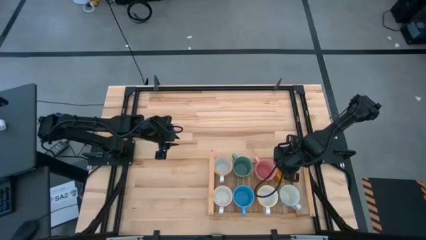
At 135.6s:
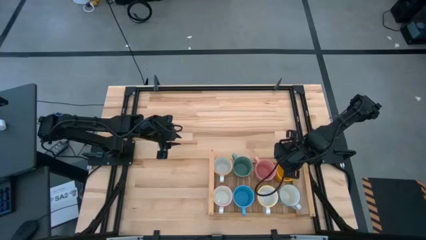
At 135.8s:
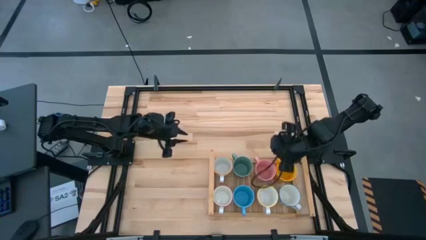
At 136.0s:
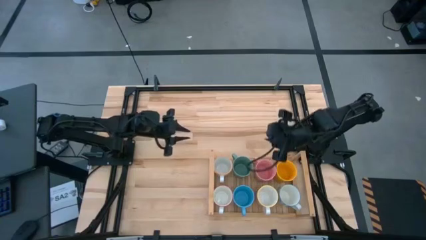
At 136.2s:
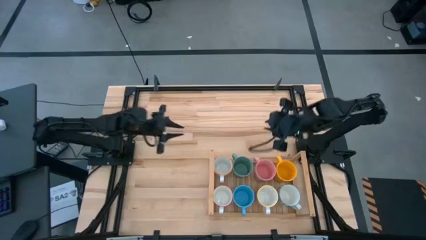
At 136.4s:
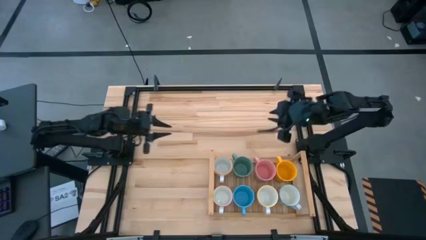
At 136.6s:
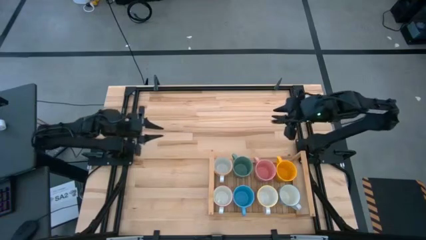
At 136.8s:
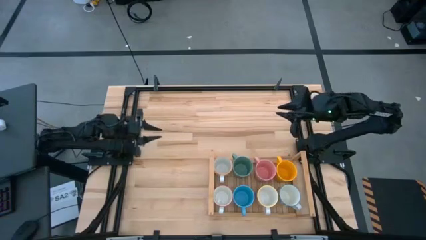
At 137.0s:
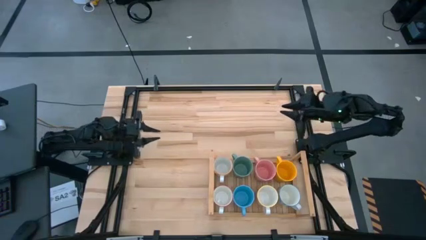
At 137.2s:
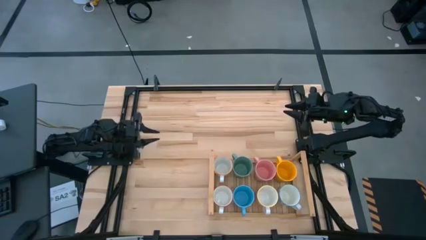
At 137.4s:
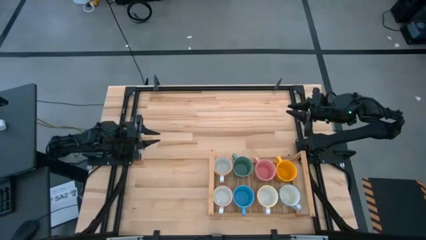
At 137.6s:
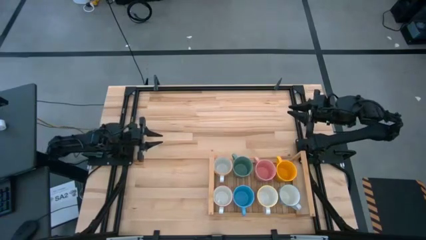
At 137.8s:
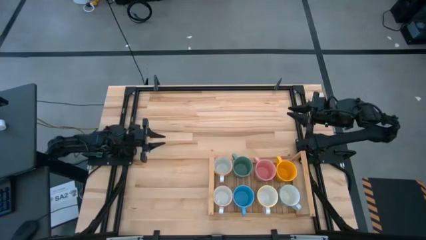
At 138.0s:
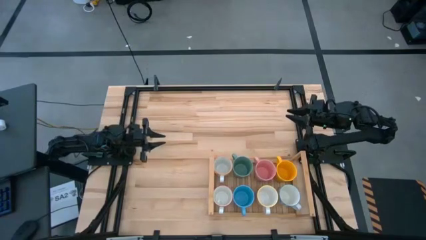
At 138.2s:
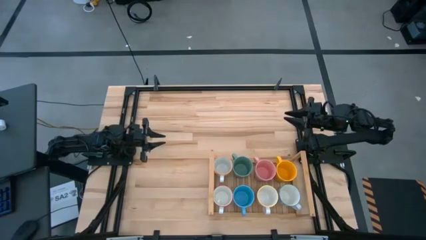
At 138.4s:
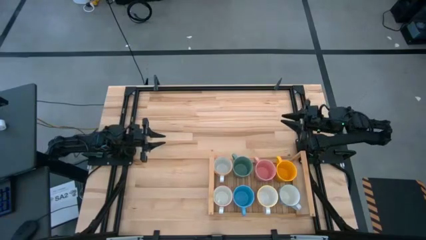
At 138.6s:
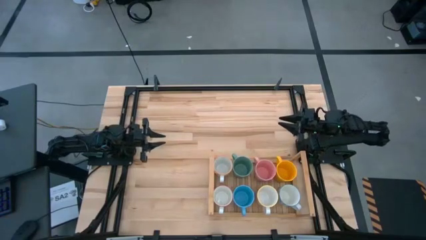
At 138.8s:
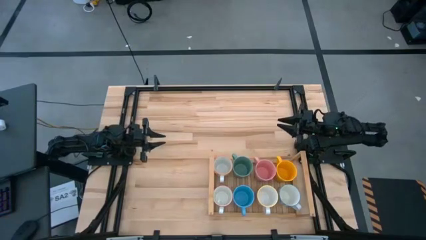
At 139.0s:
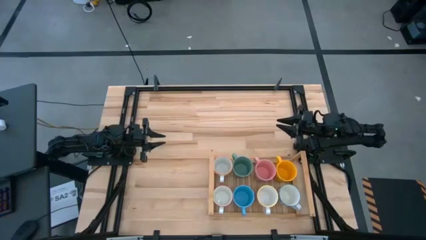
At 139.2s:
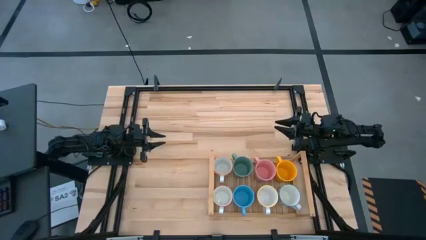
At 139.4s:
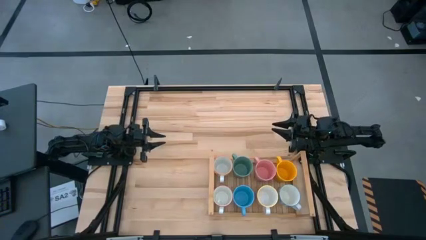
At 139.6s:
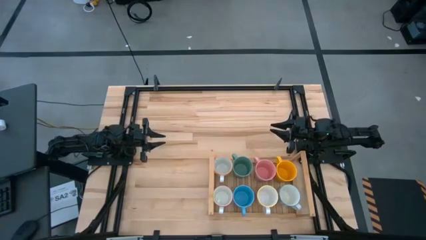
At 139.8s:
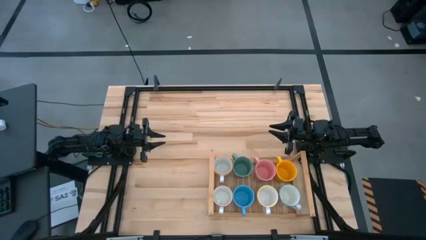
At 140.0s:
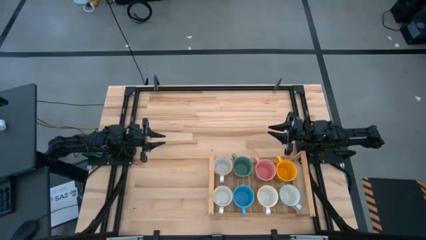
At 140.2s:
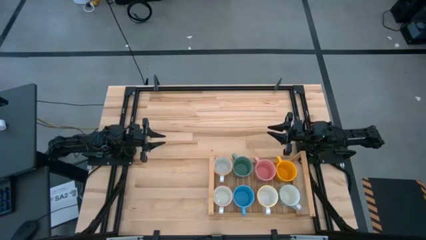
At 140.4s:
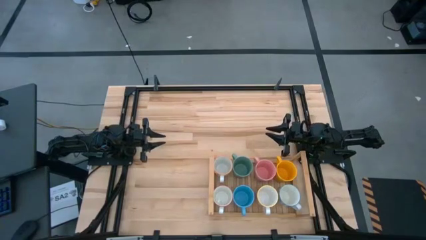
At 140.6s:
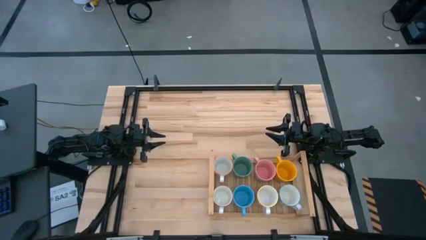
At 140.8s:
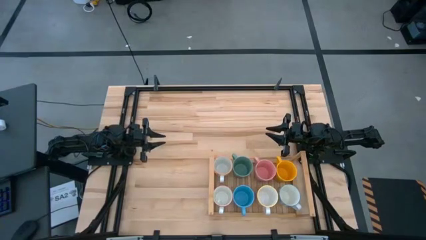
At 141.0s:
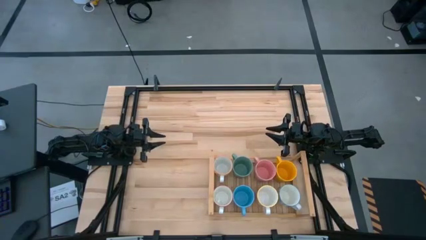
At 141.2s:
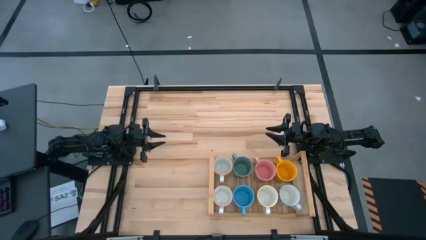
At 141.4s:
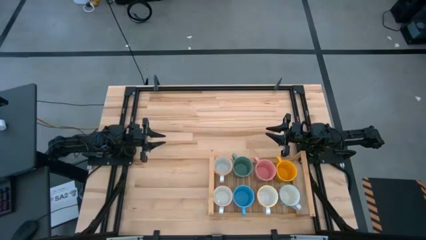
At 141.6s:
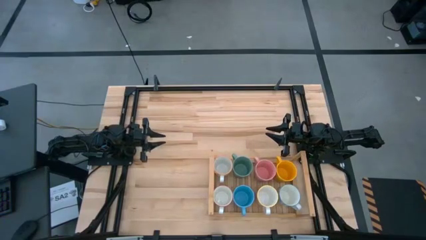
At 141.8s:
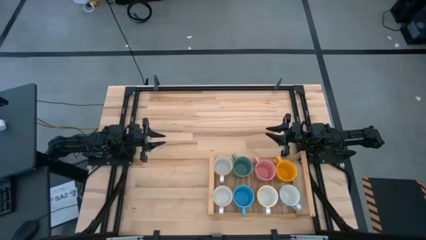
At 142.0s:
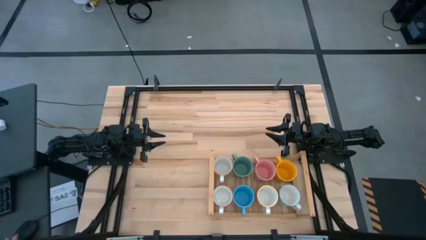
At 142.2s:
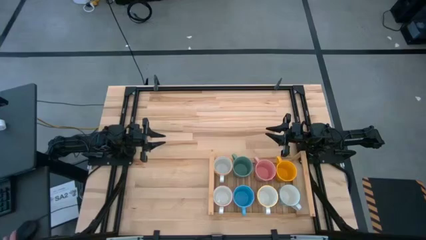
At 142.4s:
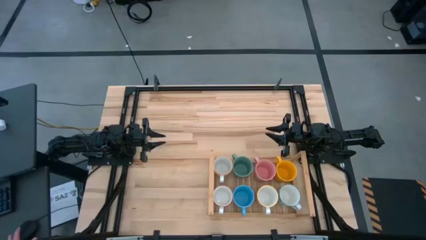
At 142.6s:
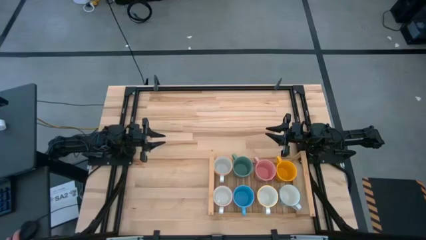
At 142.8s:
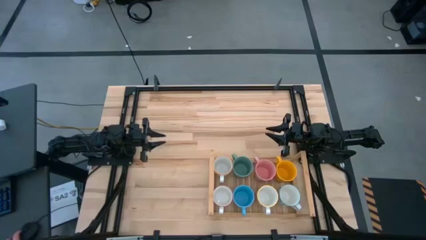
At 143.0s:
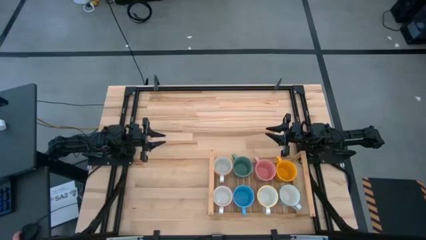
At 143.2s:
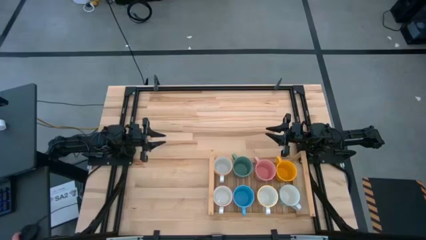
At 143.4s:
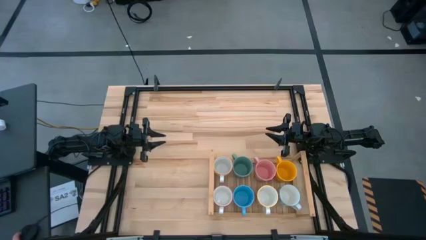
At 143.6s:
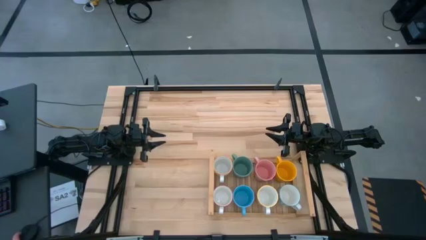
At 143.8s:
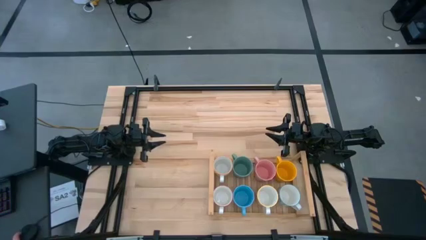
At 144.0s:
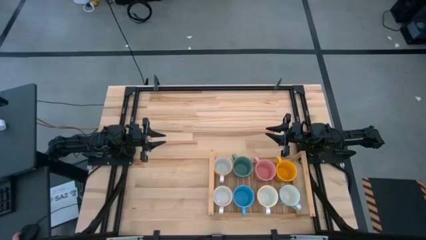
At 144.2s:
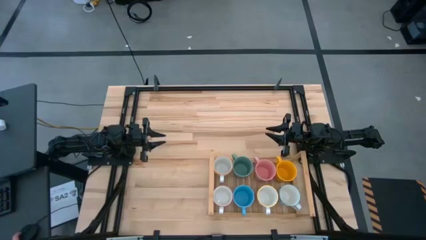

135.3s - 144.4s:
Task: Place coffee mugs
Return to Home Position

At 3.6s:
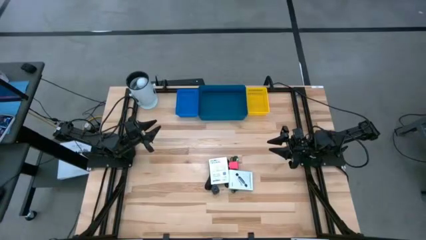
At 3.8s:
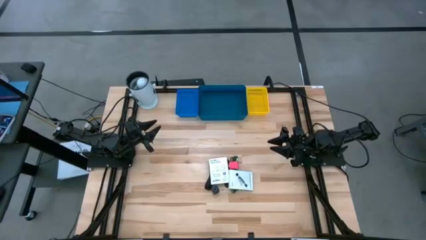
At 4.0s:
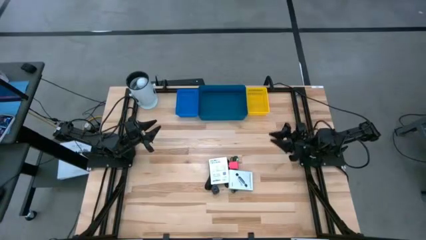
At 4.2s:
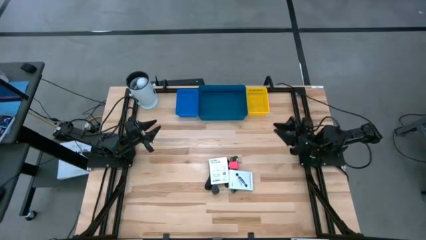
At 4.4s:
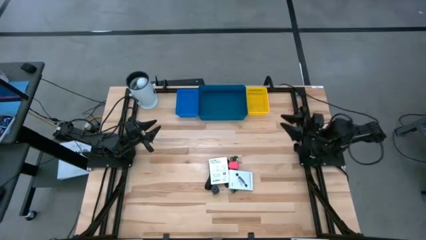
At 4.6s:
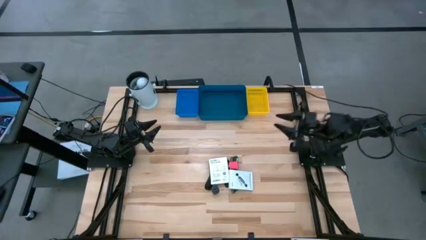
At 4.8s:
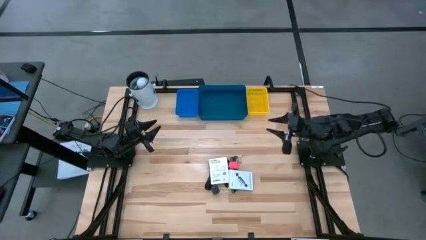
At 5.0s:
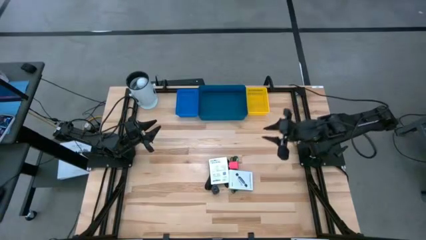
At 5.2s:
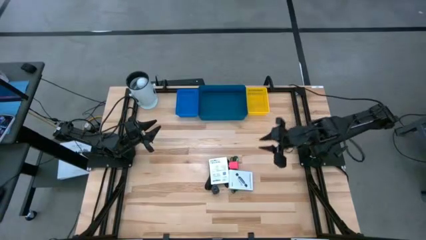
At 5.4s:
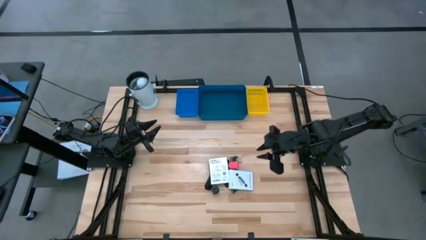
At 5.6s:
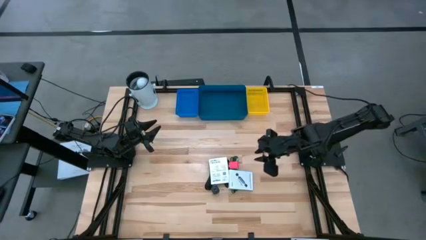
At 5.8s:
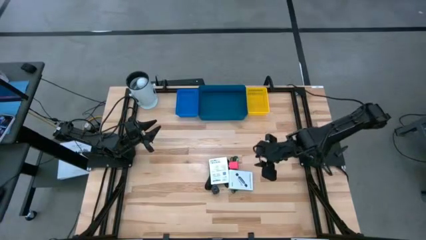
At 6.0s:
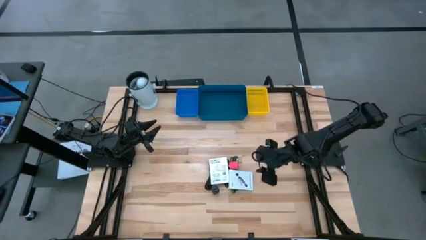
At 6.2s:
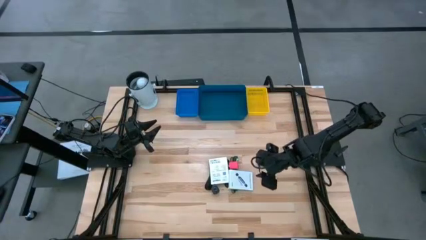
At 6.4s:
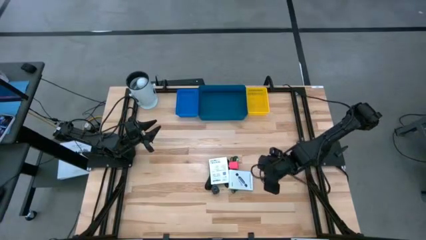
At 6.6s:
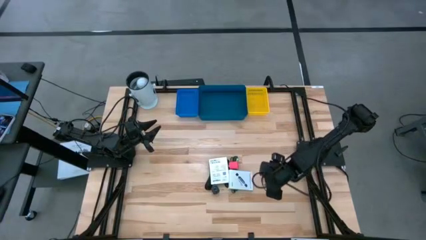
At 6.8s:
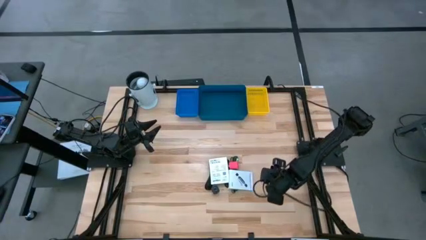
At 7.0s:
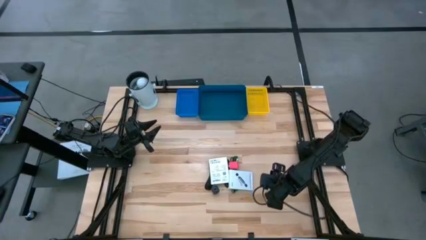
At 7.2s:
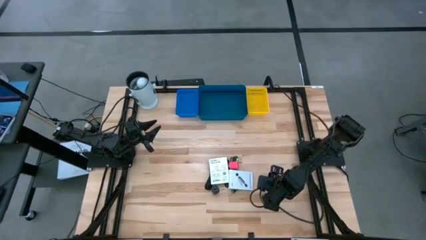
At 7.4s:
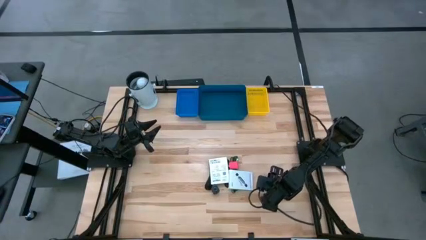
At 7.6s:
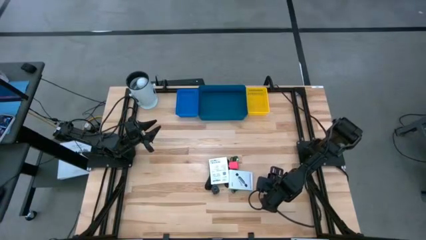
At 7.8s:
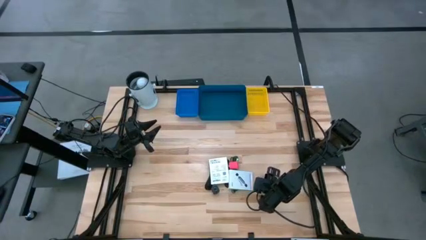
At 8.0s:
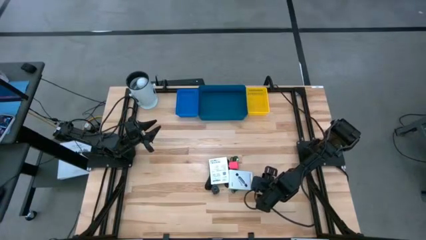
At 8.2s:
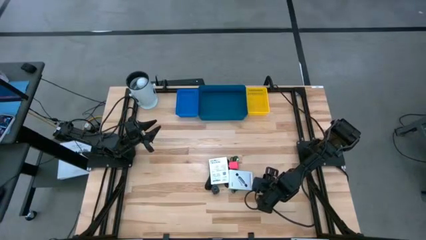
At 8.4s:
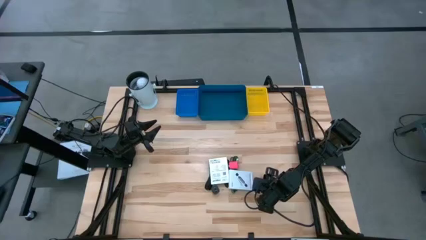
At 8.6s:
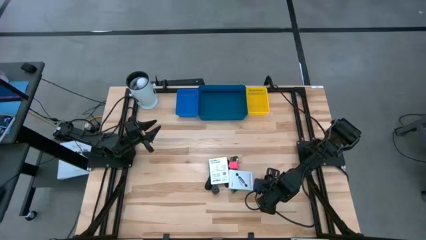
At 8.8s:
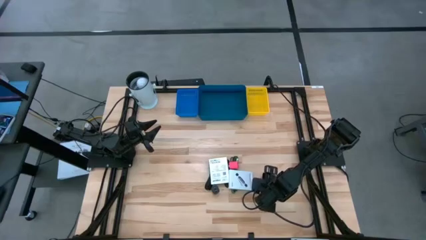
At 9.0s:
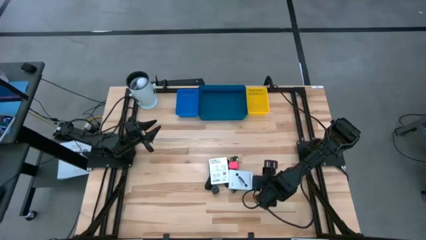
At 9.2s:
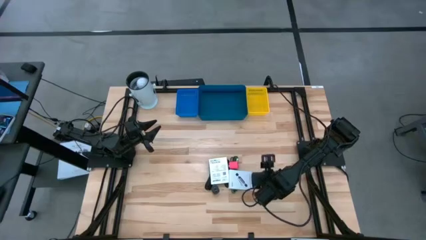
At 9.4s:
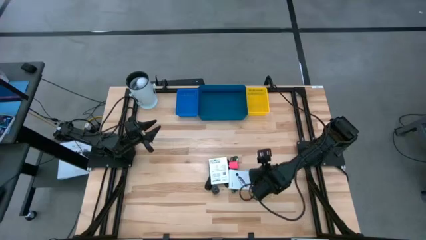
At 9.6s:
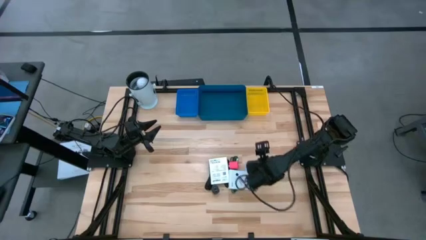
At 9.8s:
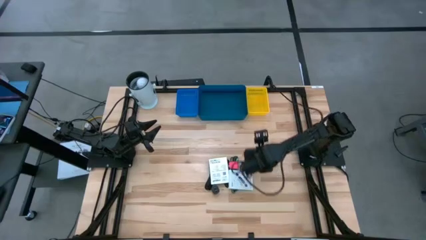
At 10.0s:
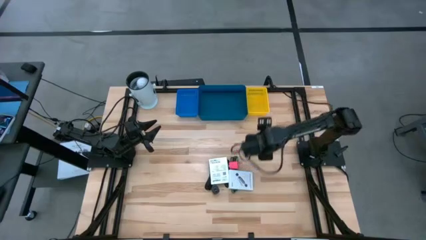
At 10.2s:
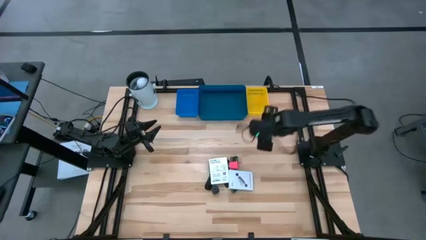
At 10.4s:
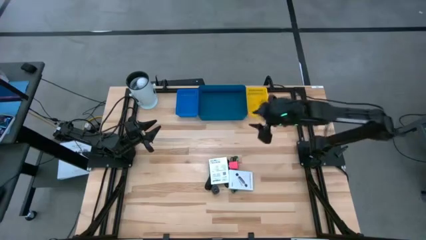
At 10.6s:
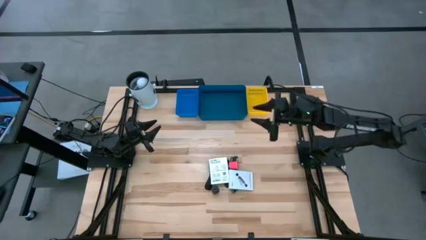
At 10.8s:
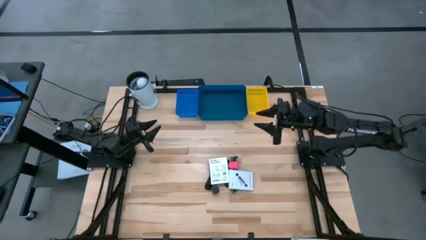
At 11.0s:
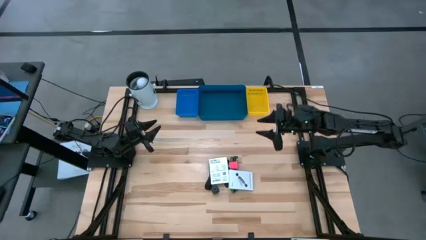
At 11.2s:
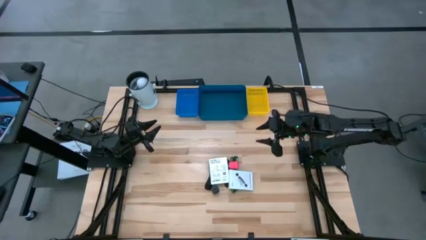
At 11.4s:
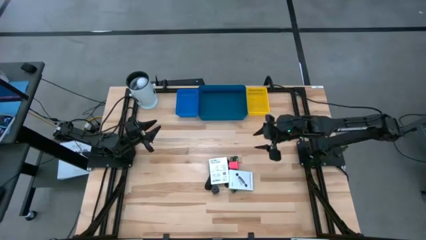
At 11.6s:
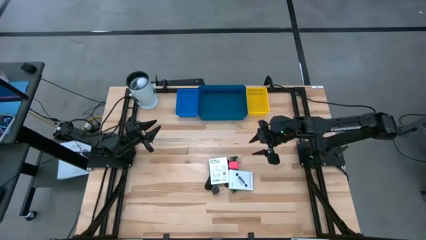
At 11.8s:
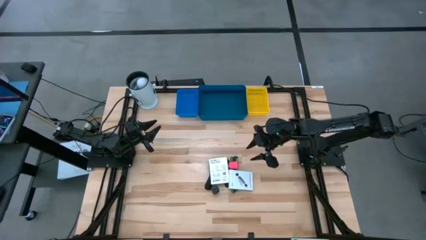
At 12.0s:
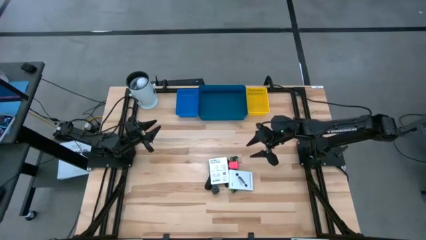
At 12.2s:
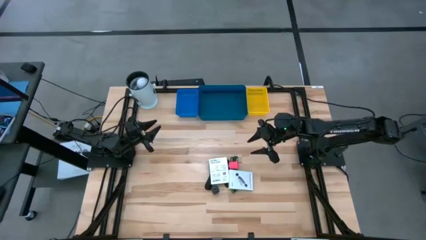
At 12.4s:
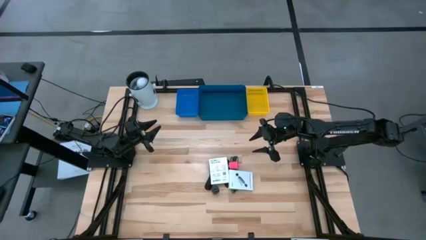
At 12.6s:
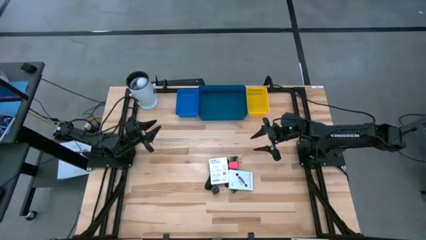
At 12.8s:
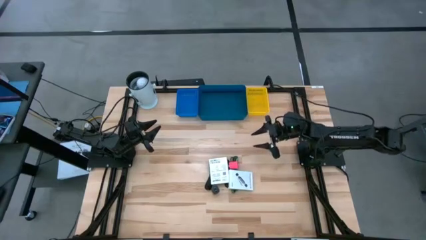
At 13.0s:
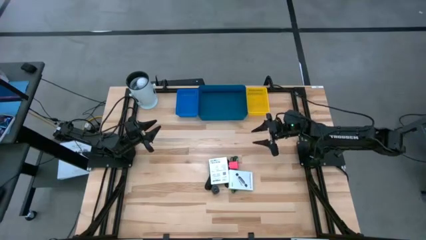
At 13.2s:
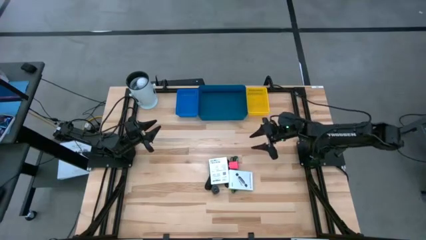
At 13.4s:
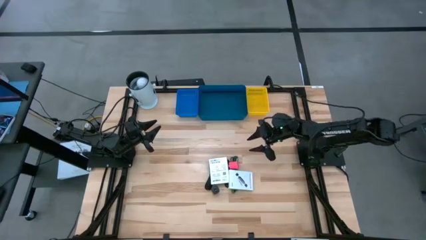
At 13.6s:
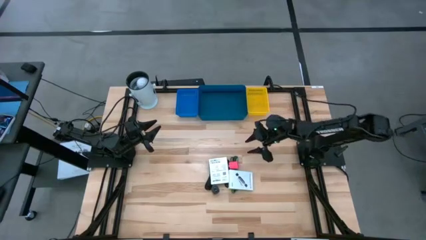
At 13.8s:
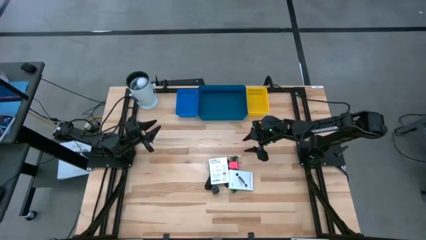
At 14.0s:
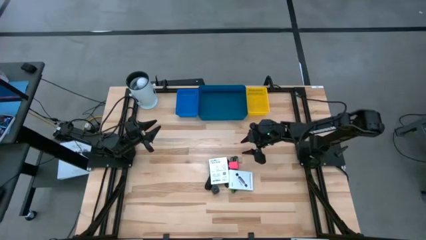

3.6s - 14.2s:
Task: Pick and place items into bin
Put the pink charger adapter into the yellow basket
